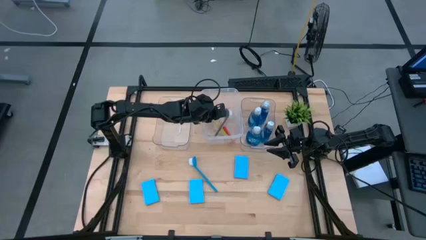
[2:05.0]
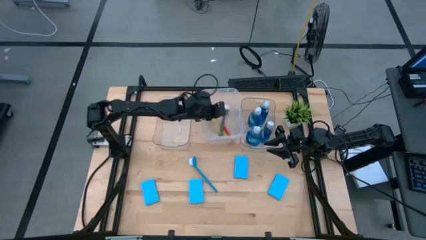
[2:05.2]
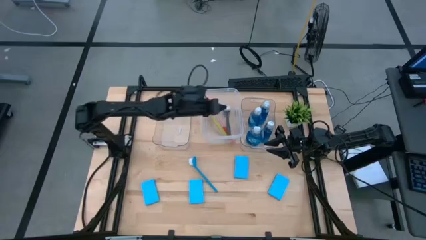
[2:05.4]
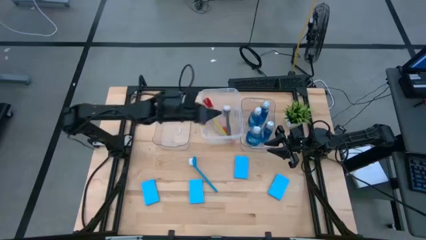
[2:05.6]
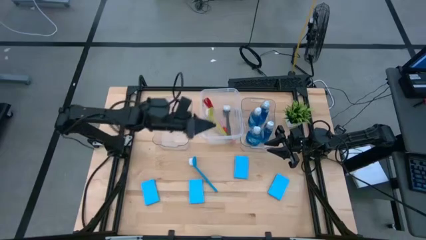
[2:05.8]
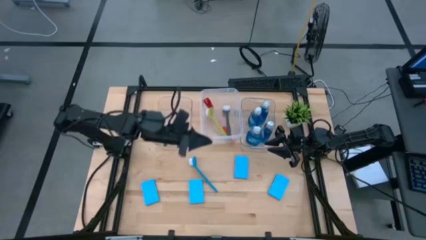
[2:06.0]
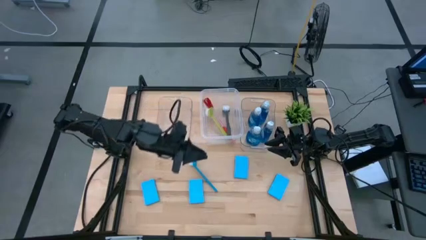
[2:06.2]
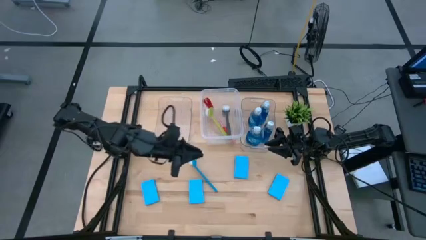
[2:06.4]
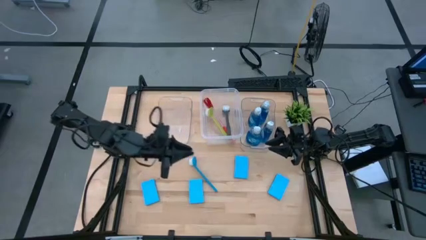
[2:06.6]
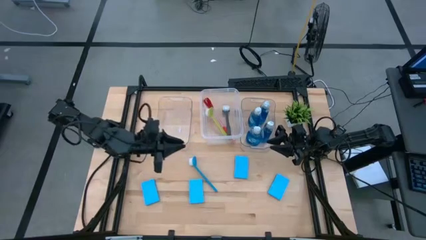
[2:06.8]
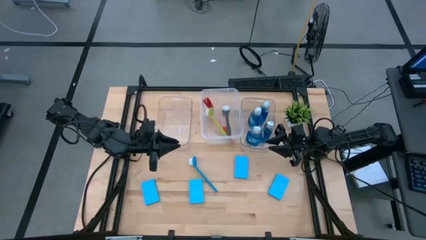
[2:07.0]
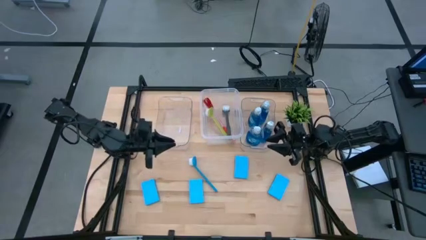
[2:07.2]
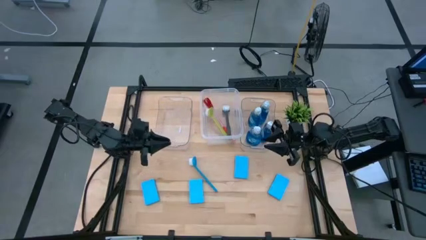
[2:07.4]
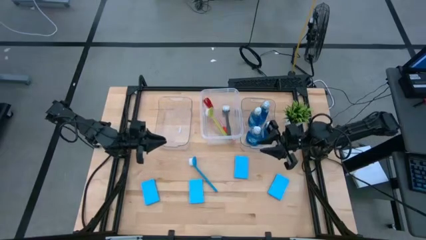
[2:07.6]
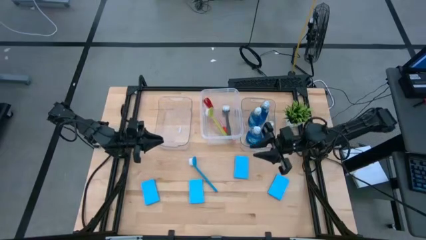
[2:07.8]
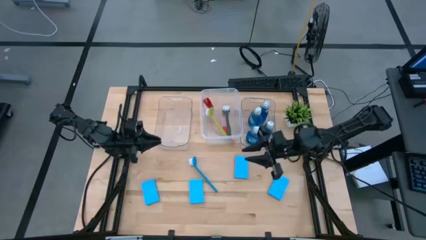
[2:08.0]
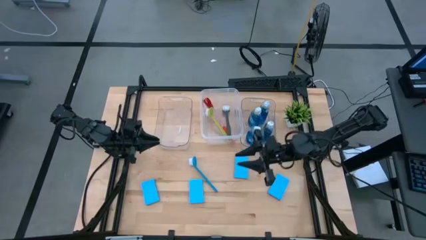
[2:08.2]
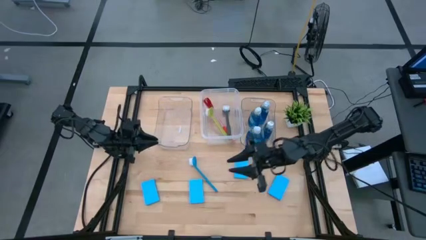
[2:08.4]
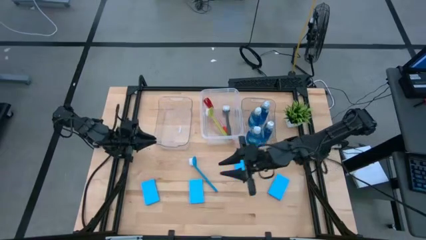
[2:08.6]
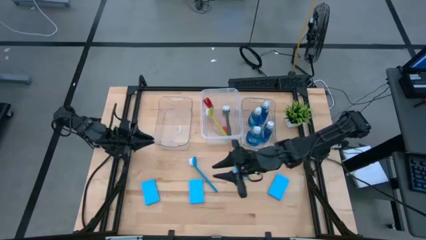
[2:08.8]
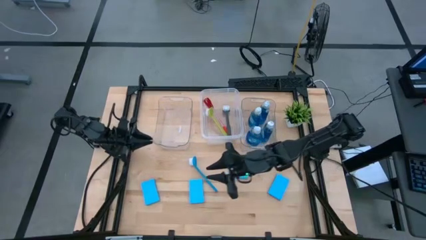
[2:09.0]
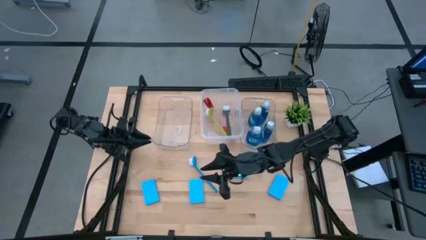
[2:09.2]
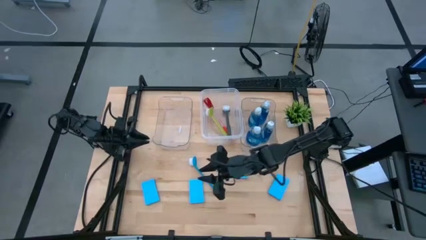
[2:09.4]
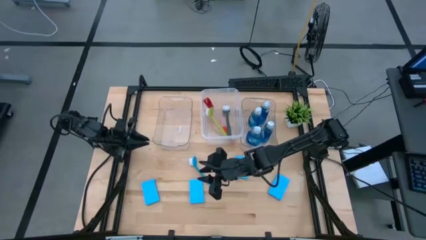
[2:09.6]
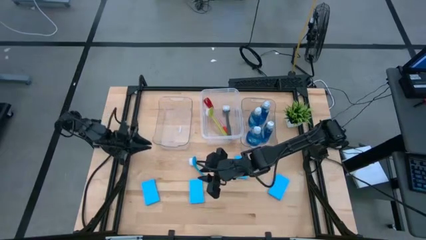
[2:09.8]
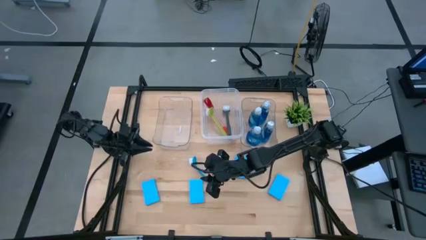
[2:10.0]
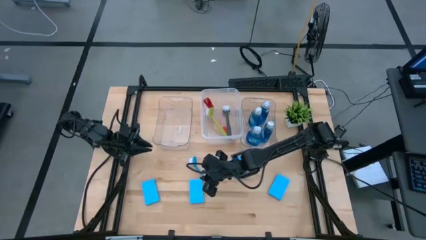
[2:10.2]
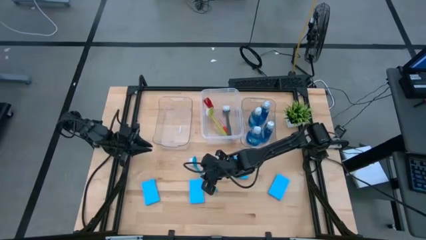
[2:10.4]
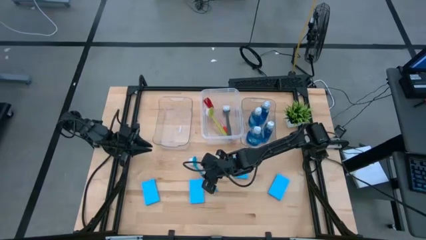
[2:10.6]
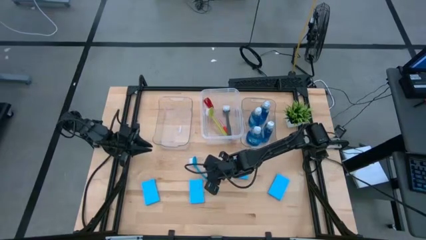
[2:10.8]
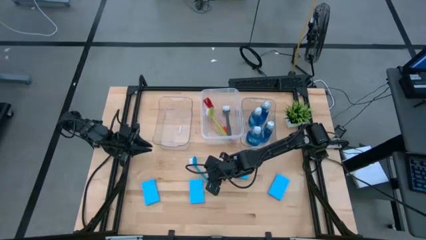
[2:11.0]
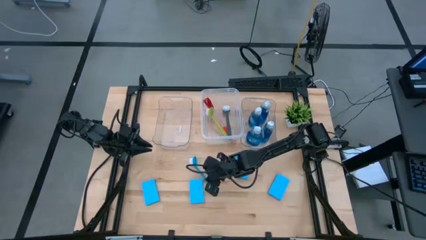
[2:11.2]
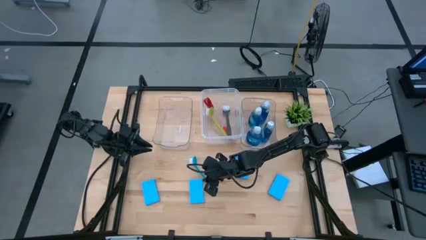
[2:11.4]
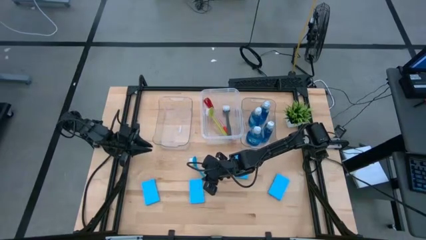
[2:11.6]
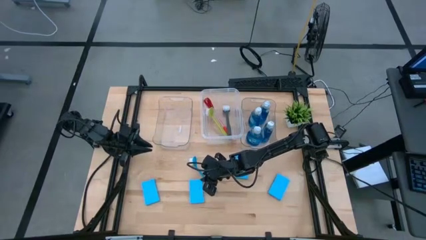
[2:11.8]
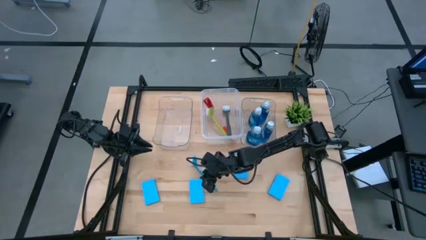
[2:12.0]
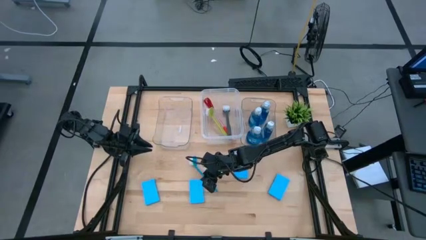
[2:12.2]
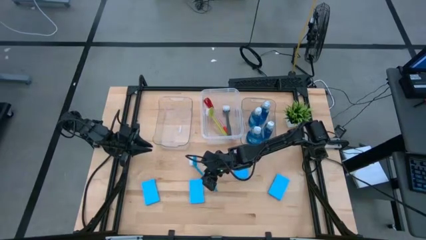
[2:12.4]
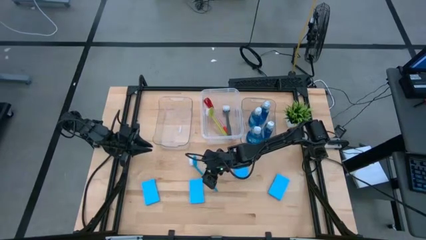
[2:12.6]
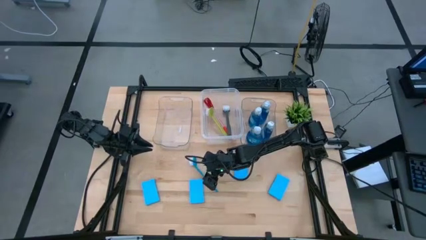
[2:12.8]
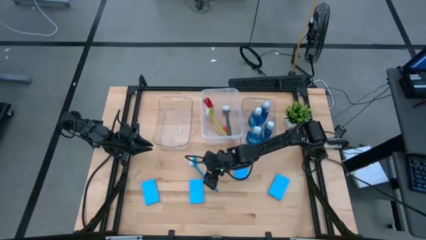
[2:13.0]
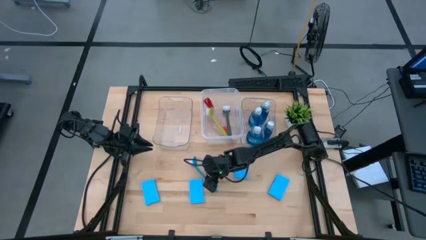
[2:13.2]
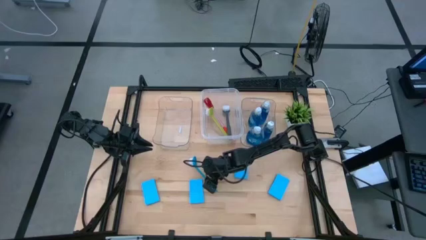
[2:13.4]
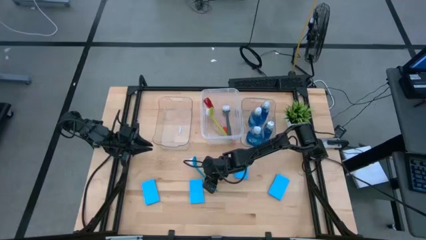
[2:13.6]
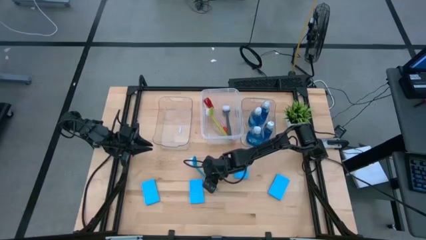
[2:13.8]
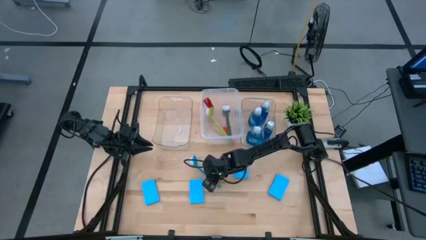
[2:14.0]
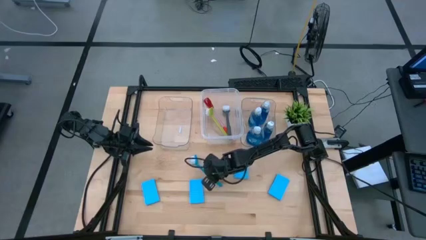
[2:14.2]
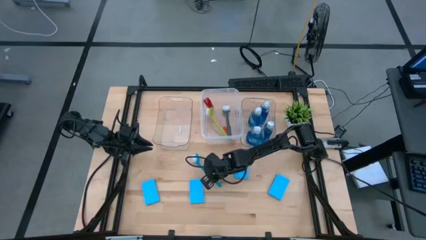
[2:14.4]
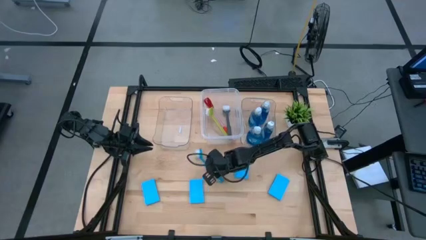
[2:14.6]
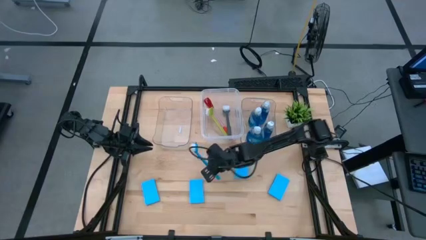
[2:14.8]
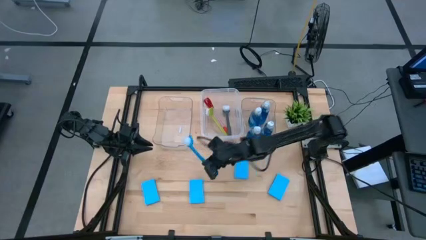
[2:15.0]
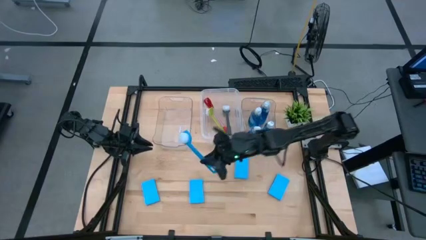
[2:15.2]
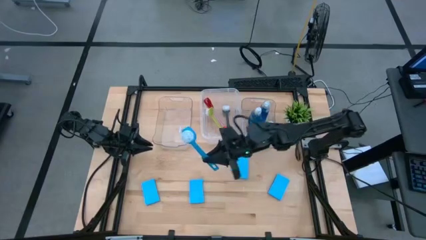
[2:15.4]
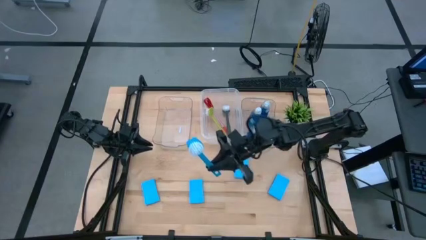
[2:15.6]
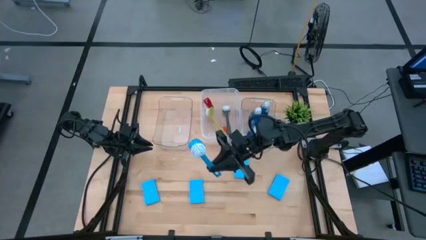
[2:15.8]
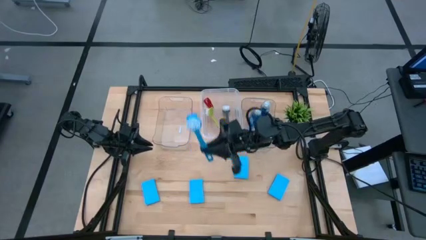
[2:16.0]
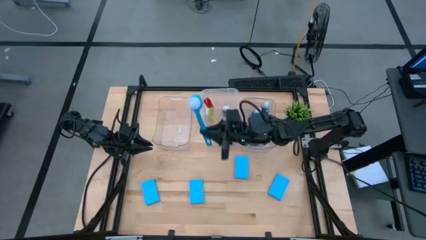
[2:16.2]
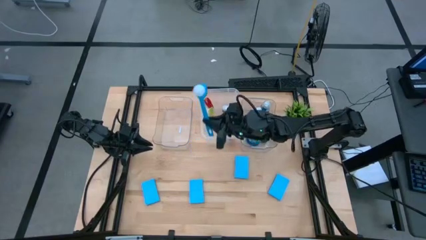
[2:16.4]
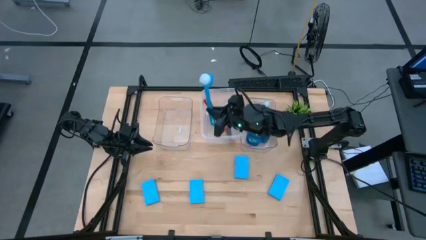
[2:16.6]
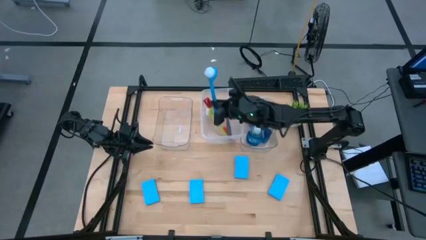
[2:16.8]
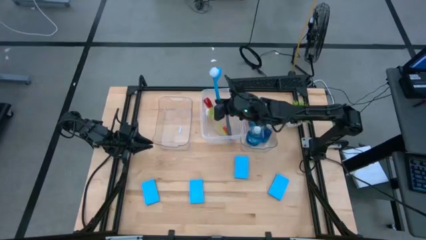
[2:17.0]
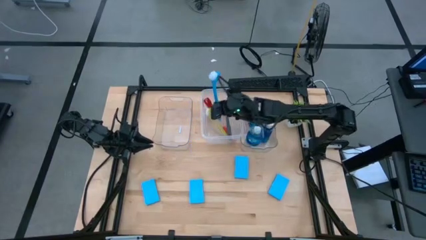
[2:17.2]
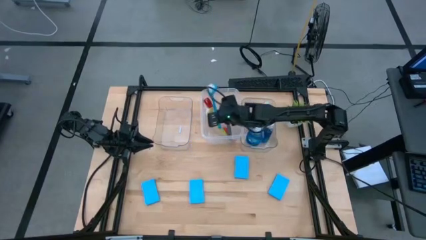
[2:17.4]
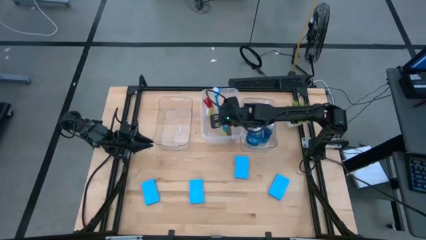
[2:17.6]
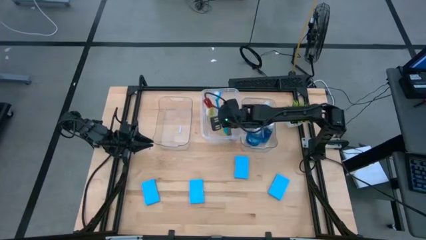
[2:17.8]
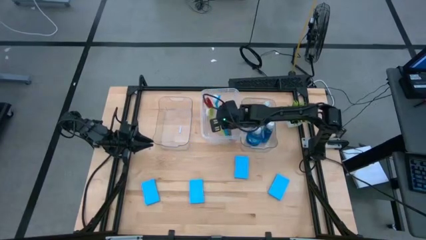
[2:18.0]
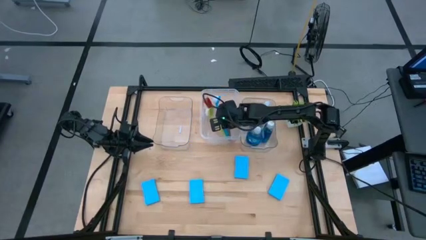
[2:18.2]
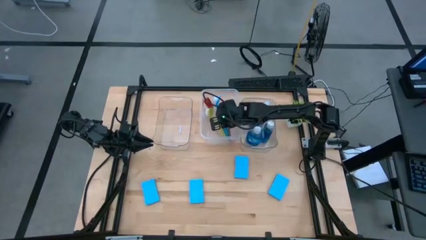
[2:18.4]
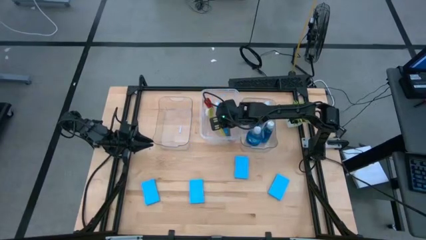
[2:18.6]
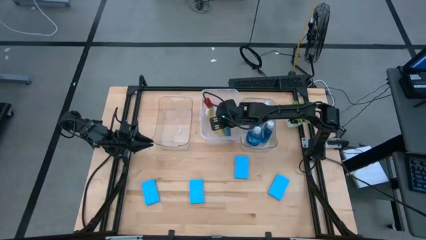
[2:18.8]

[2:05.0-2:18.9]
Task: Pick & Place Kitchen Sink Supplies
Put the blue dishwashing brush into the middle transparent bin
